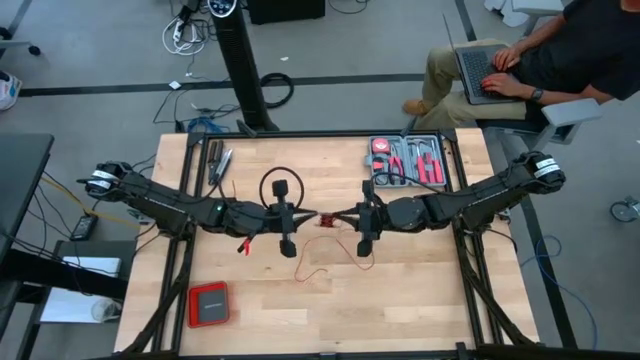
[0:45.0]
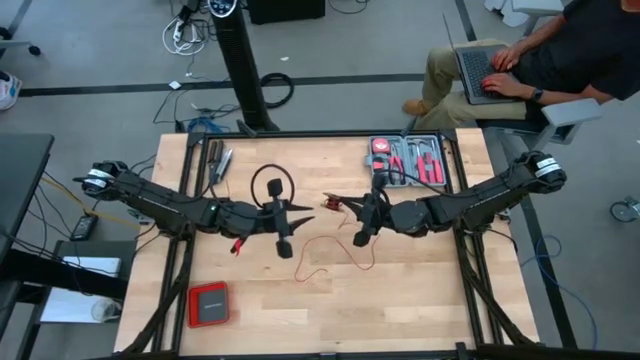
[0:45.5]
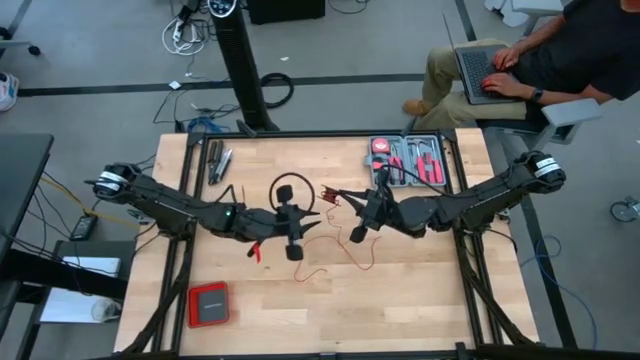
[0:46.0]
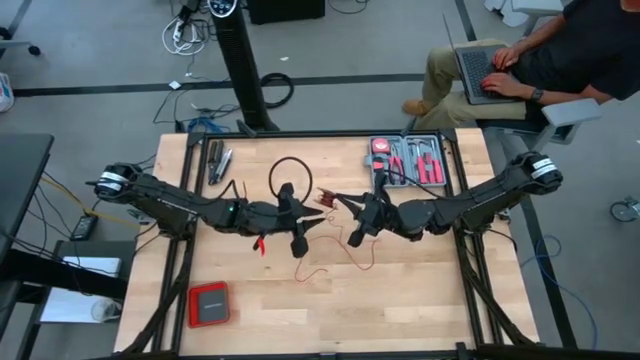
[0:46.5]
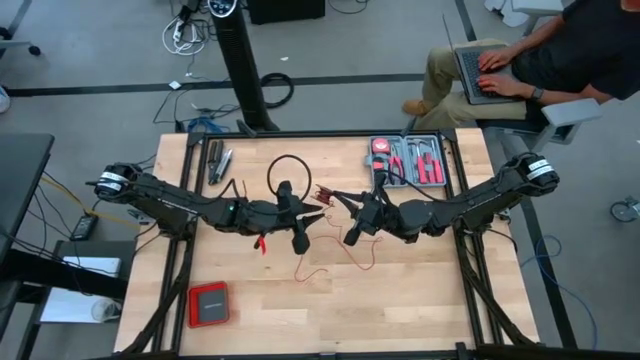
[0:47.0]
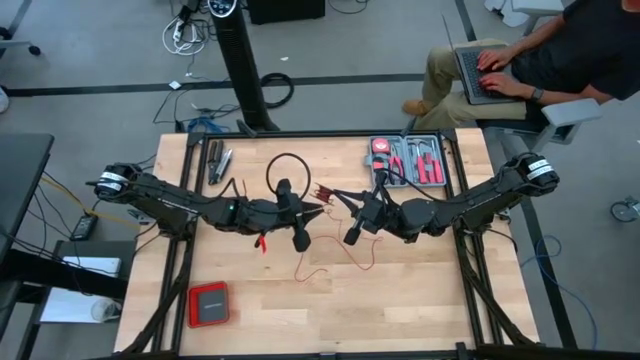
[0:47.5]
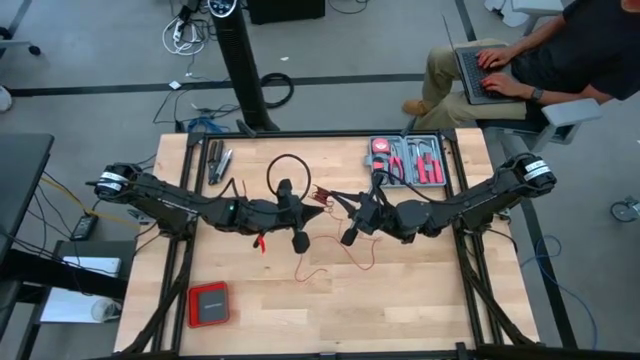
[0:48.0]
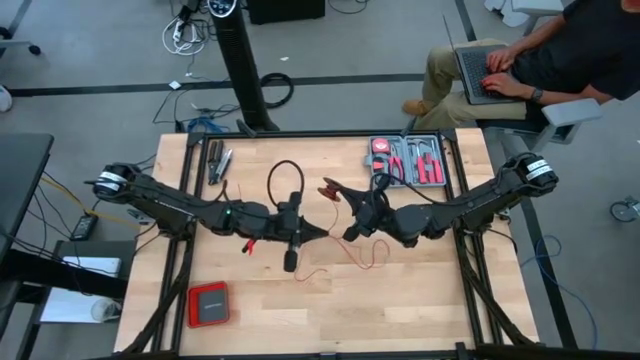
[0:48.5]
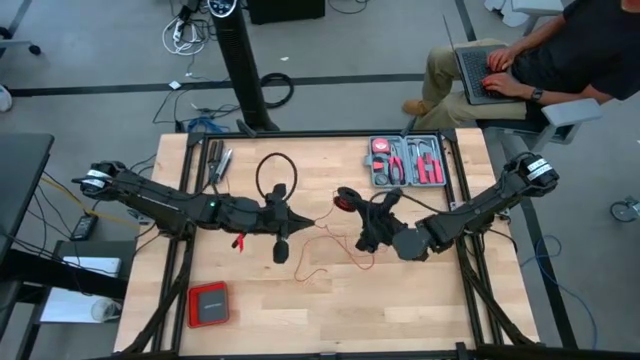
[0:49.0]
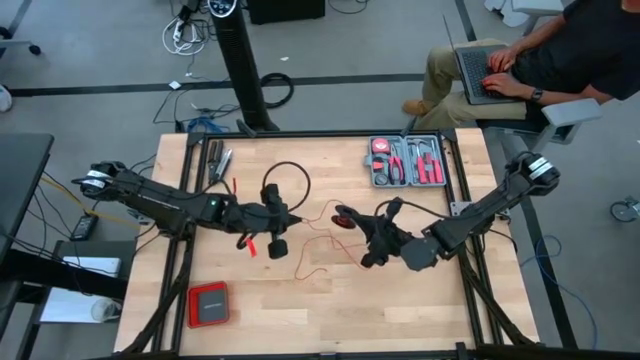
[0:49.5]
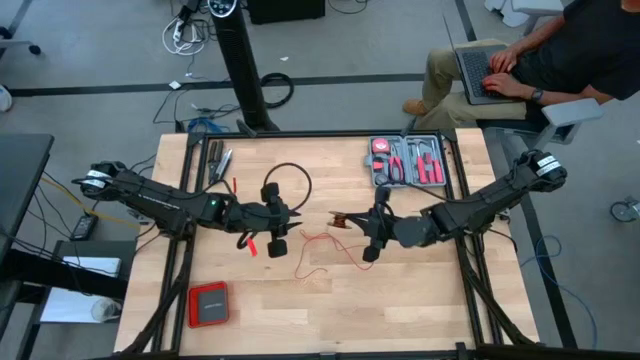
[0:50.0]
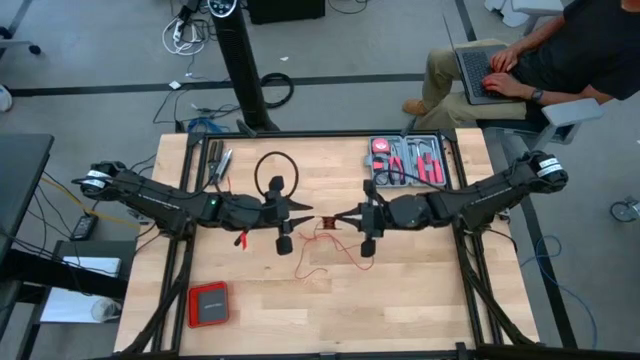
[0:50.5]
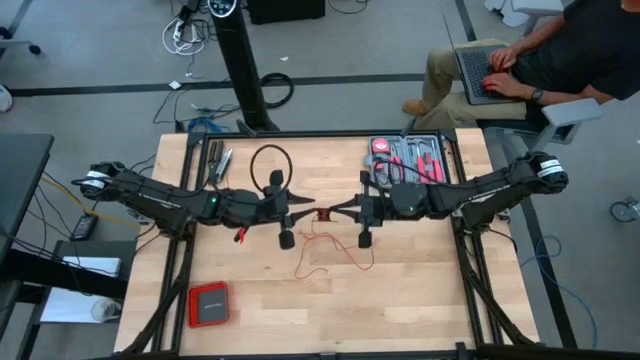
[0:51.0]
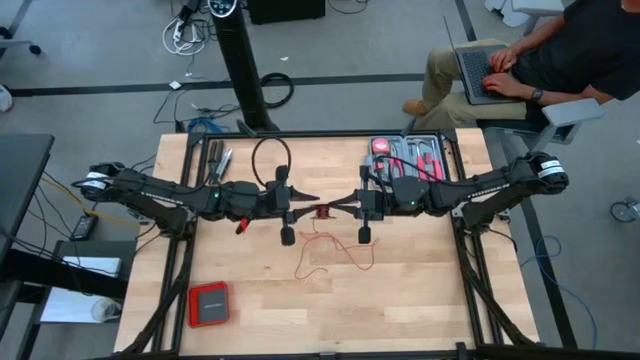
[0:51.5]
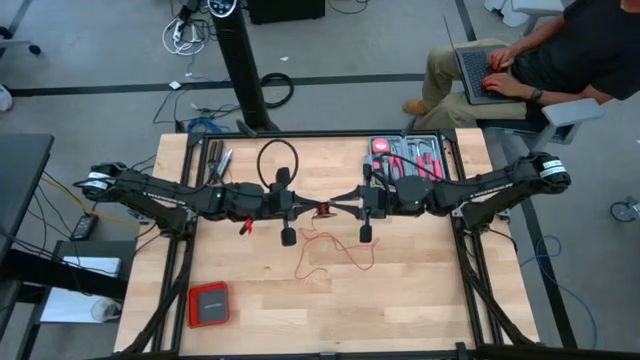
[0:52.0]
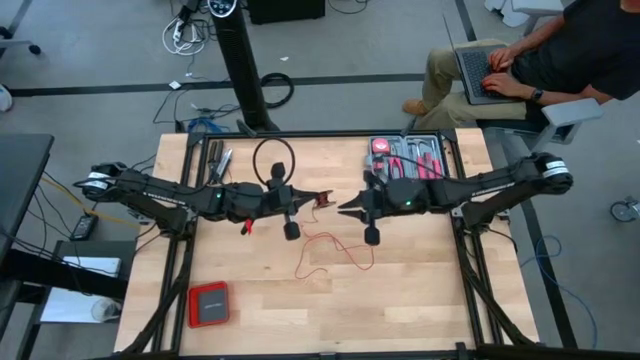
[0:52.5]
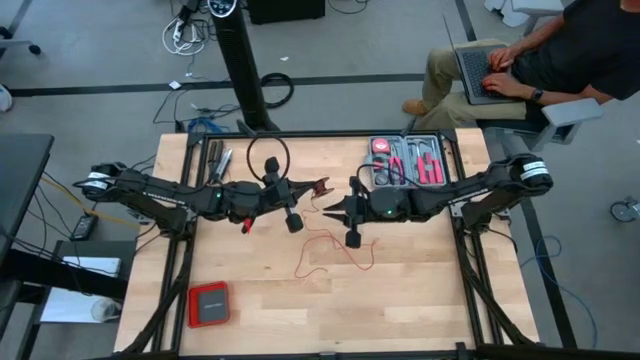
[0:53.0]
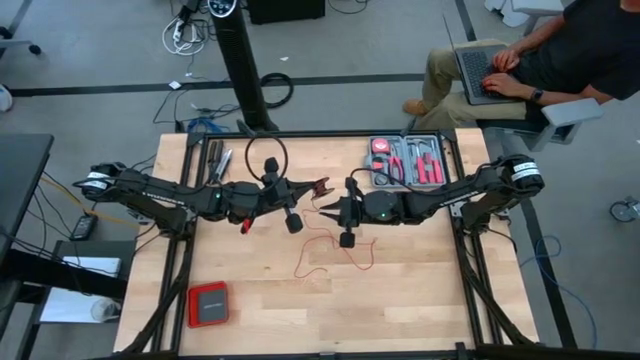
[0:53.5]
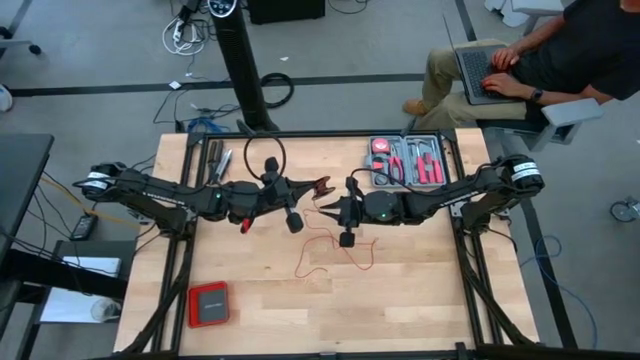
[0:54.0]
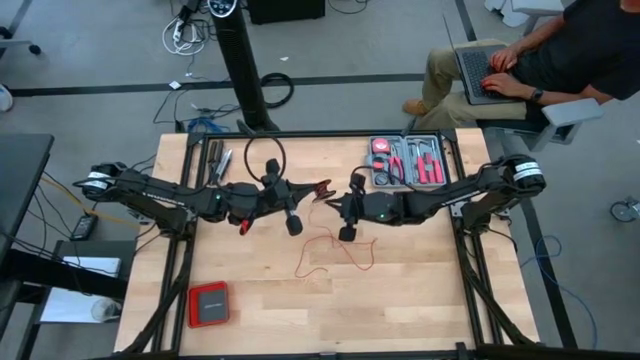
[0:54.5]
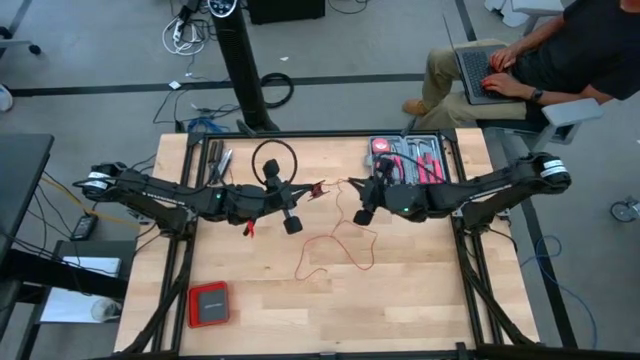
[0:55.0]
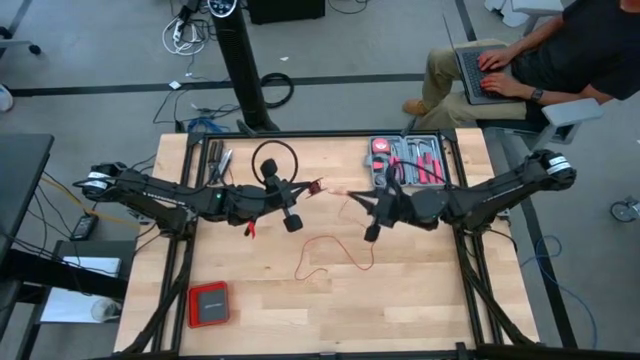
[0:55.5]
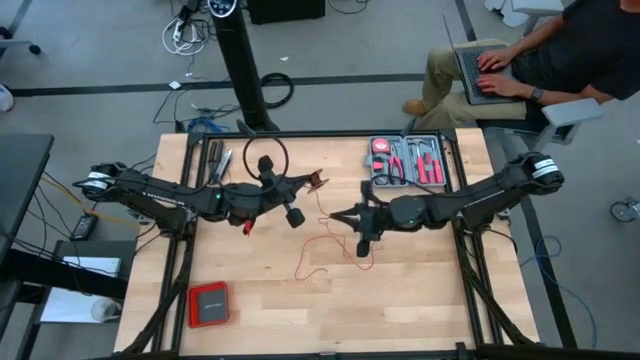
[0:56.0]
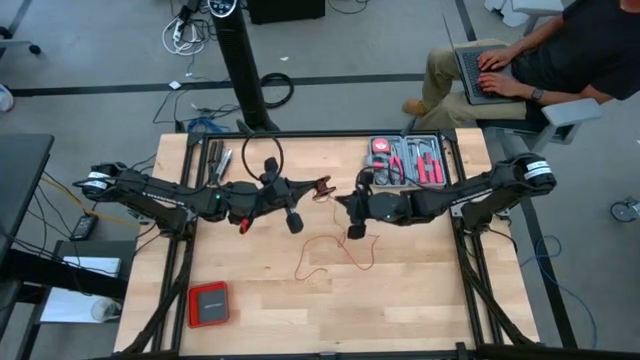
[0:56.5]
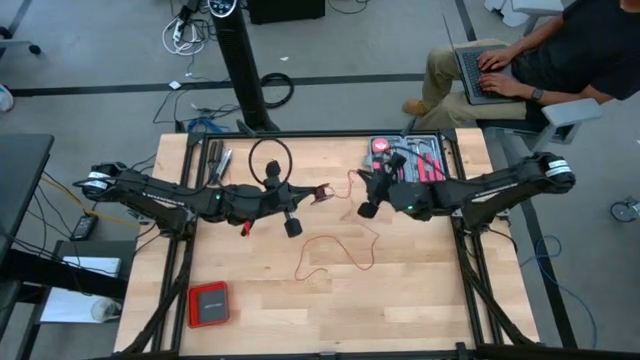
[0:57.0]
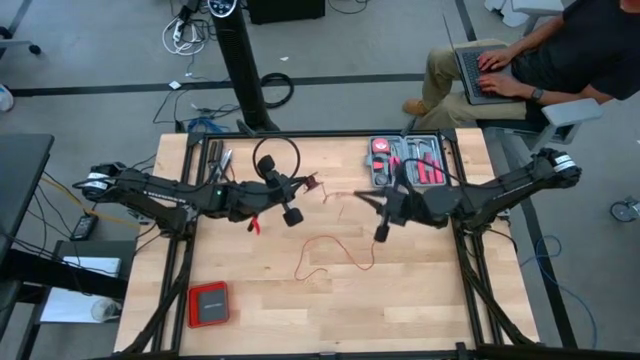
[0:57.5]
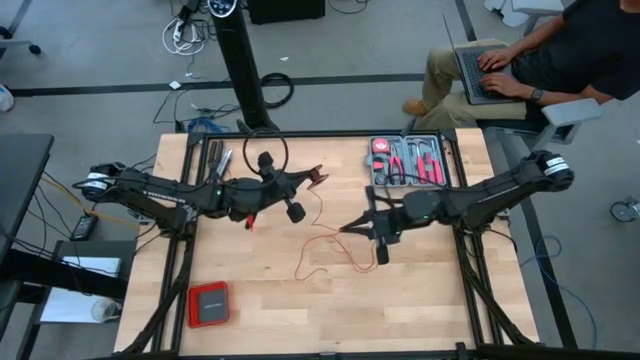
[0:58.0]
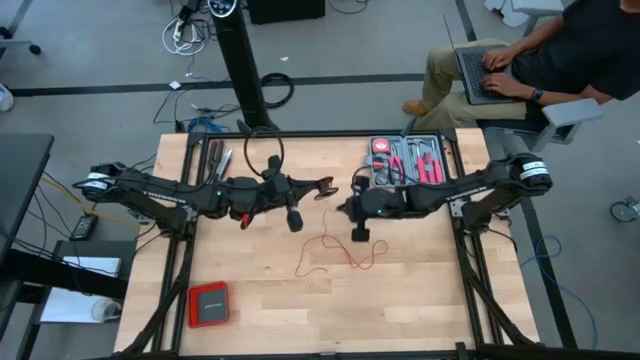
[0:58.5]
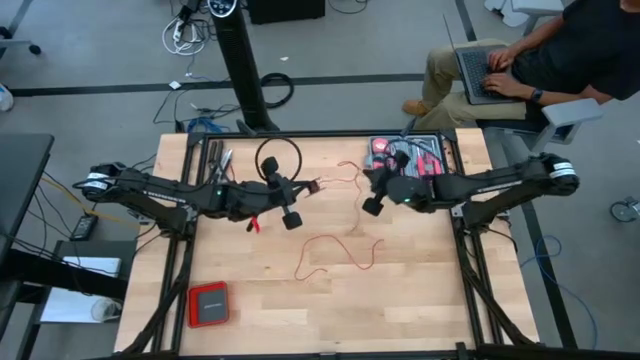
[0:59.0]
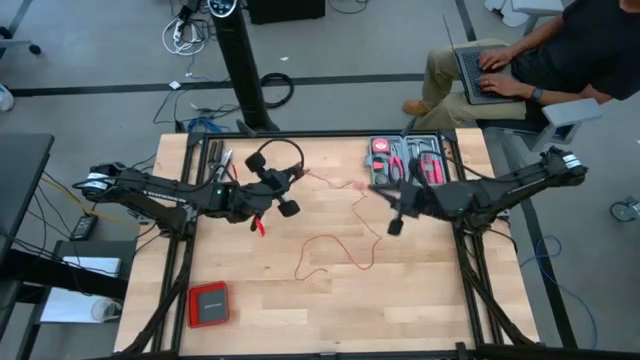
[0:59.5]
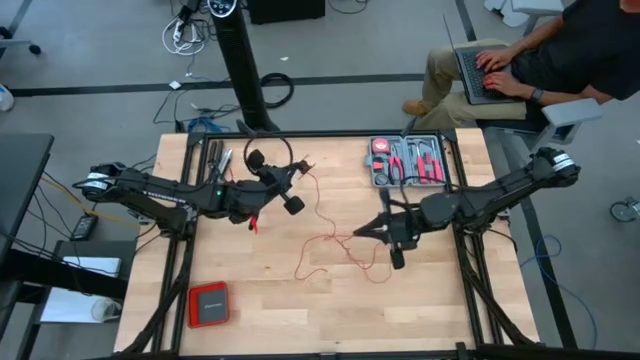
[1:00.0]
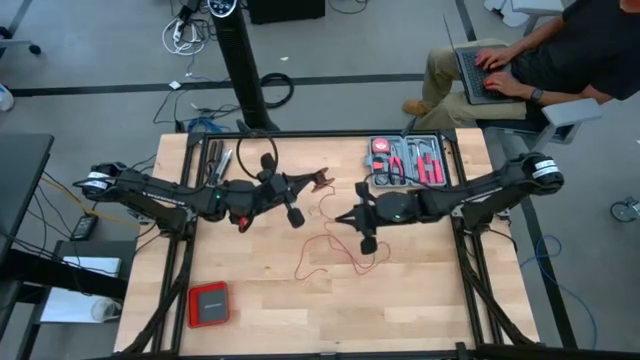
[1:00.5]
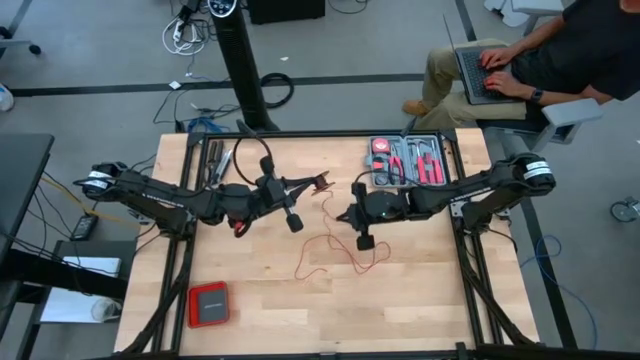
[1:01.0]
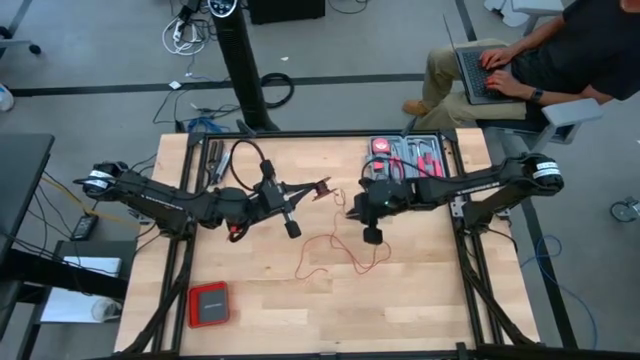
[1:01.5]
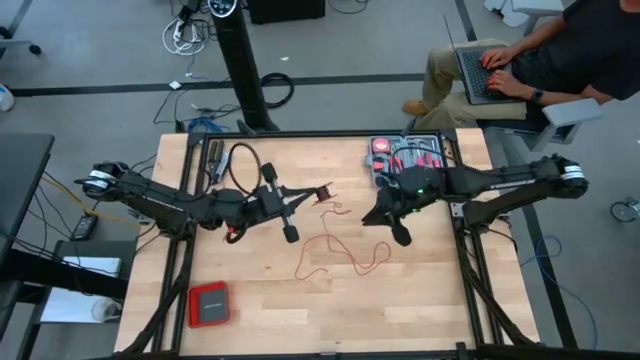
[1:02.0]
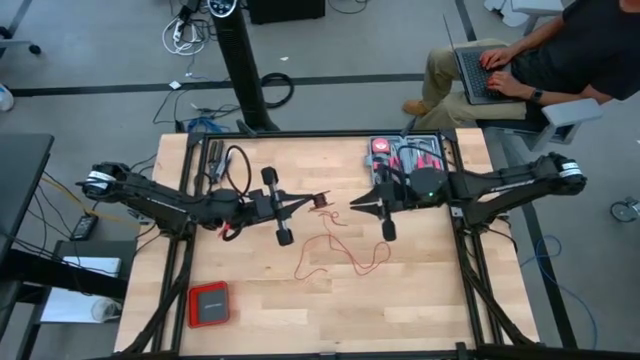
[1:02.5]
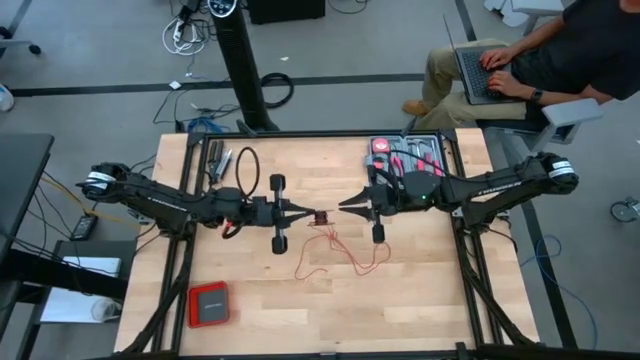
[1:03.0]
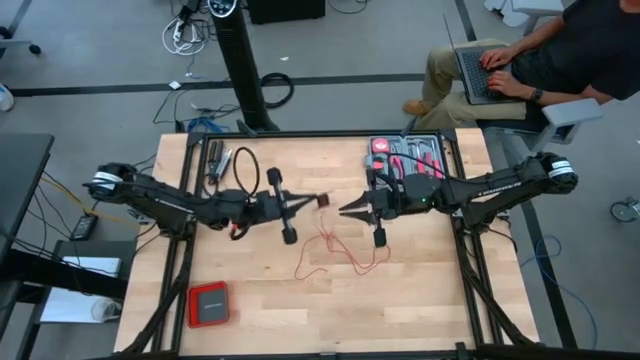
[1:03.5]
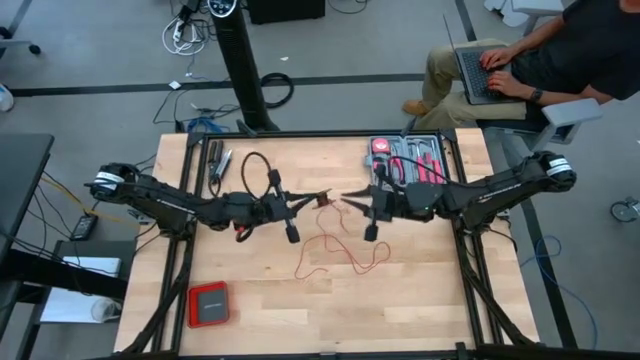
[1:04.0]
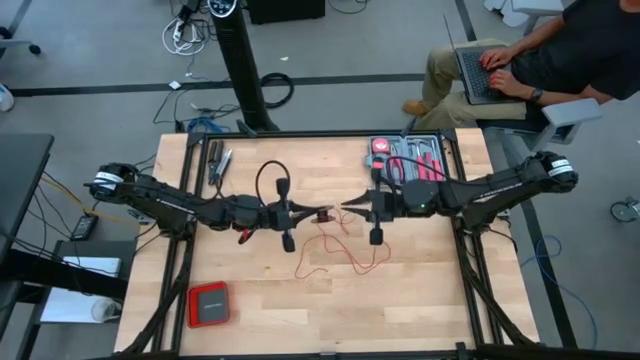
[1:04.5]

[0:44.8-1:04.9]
Task: Coil cords
Uncoil the red cable wire from the black spool

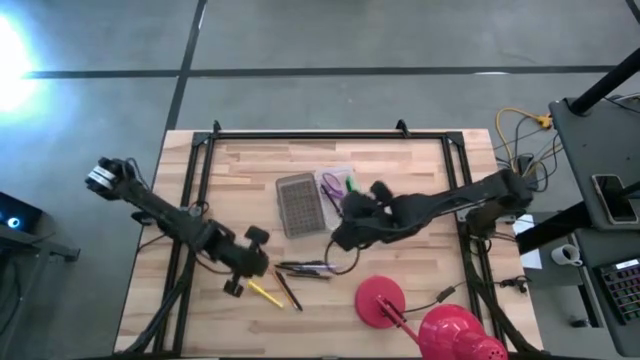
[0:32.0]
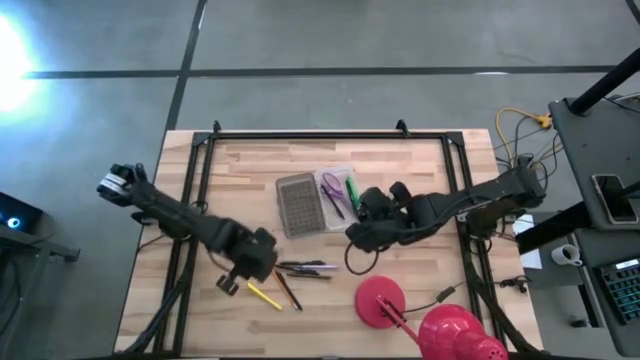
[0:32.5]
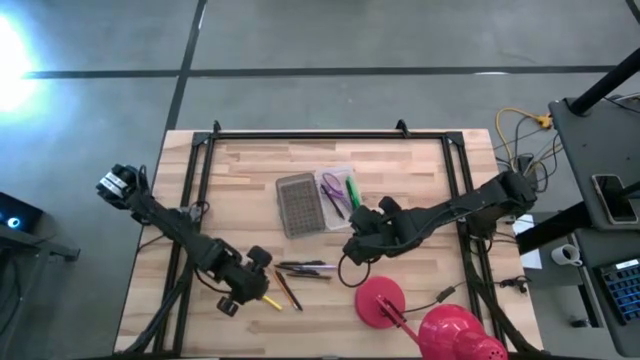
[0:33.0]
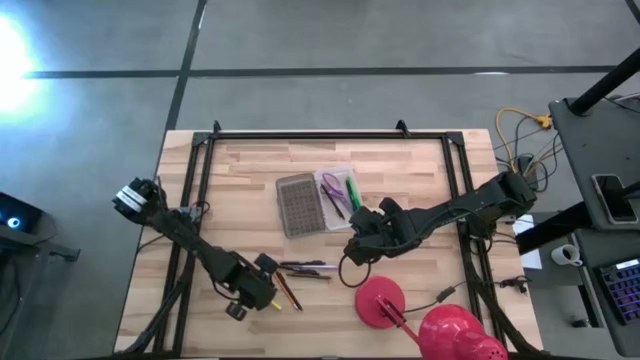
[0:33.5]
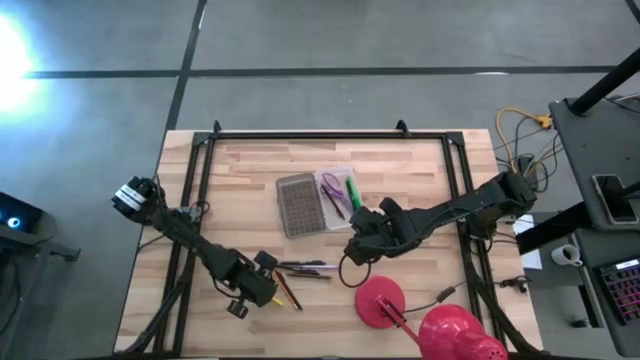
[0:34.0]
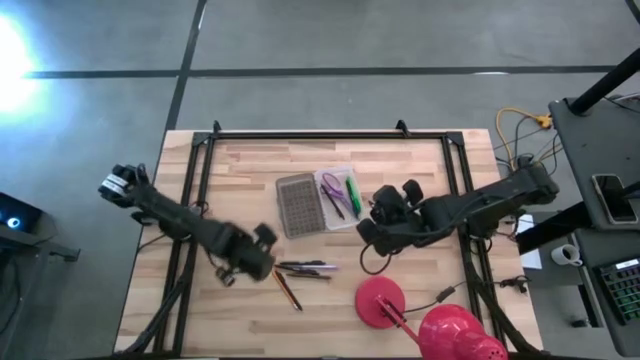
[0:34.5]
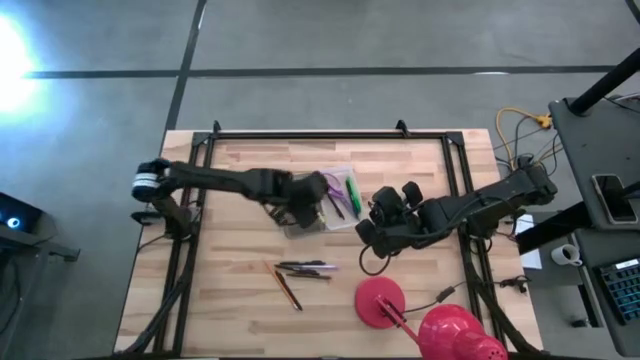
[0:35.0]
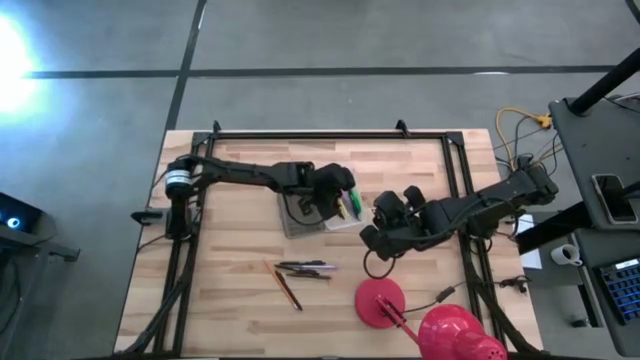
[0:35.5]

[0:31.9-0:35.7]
Task: Pick & place school supplies into a supply box
Put the yellow pen into the black supply box
